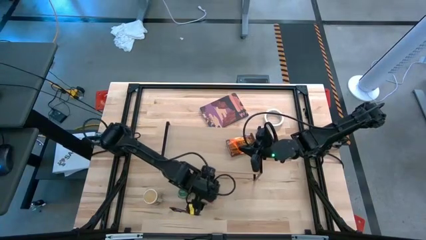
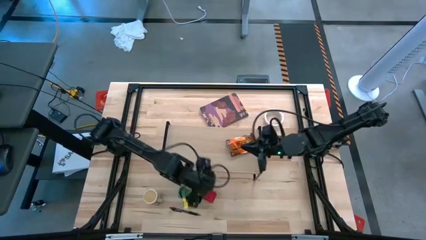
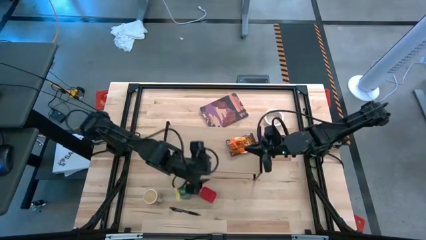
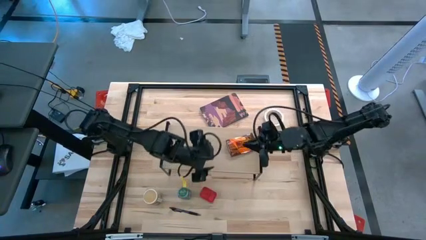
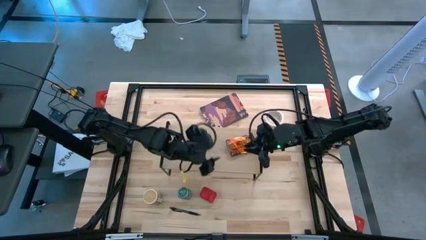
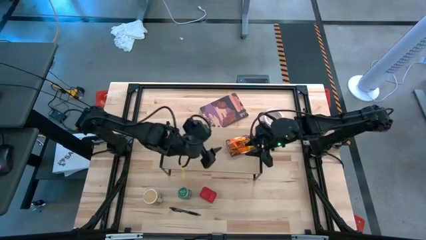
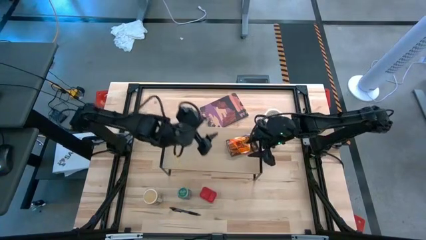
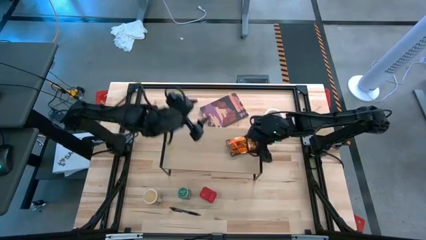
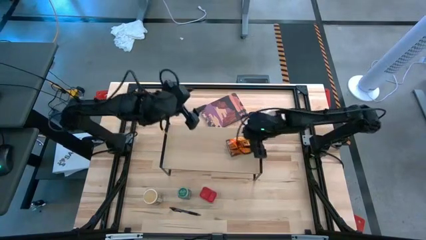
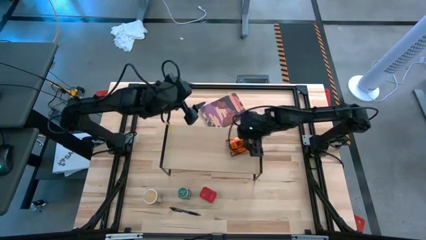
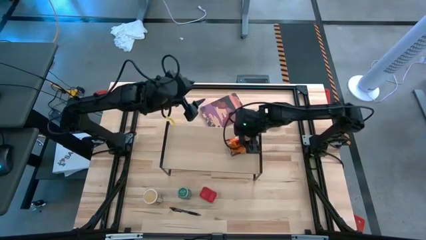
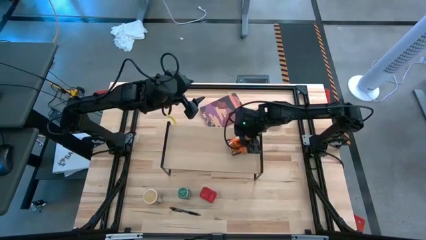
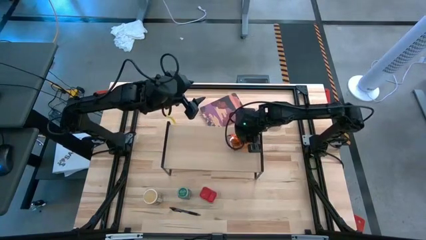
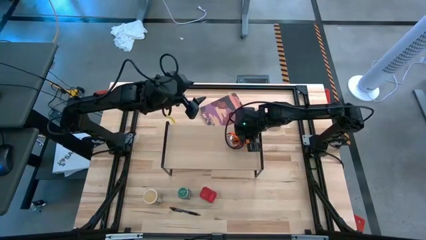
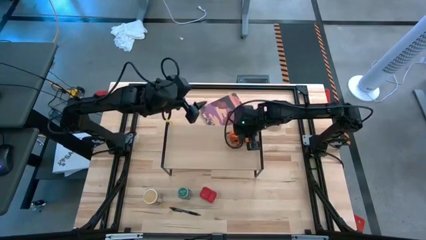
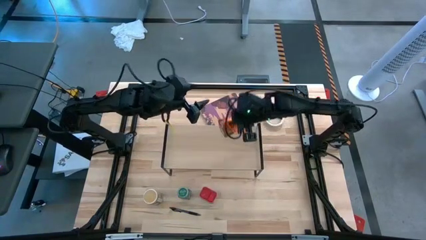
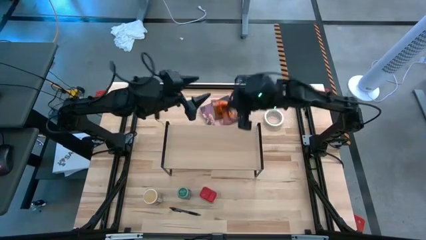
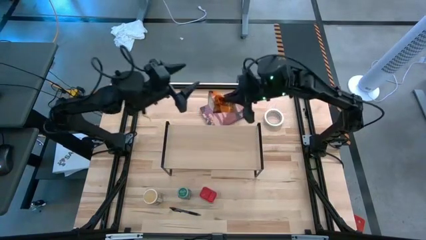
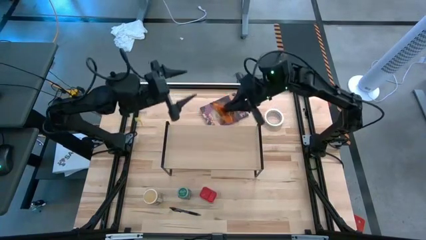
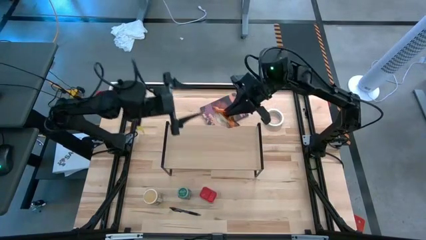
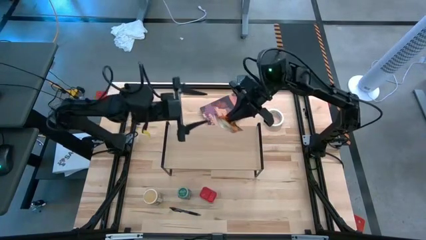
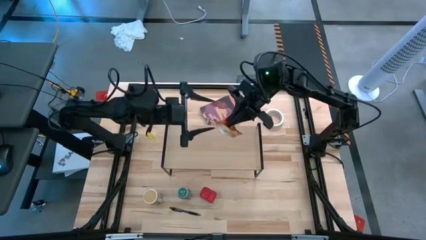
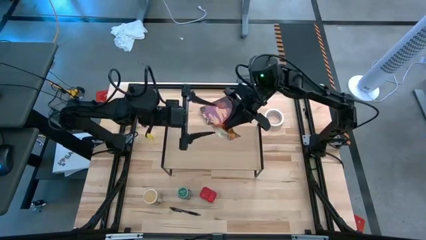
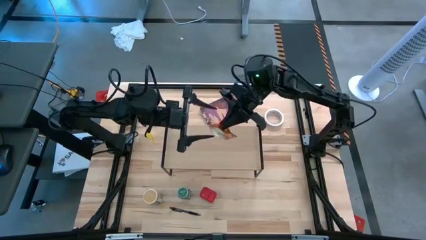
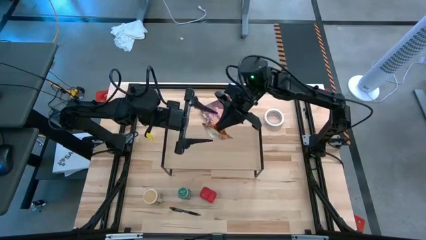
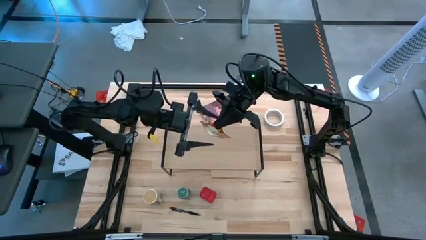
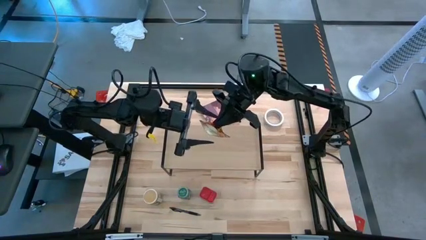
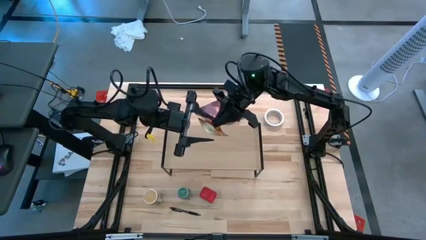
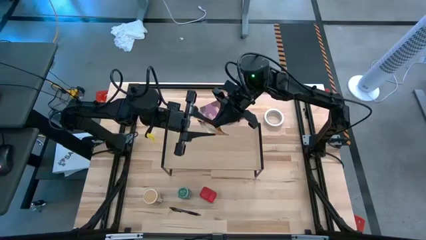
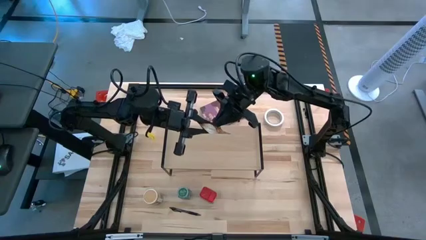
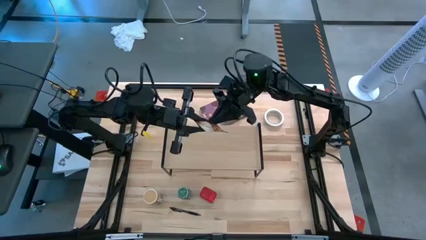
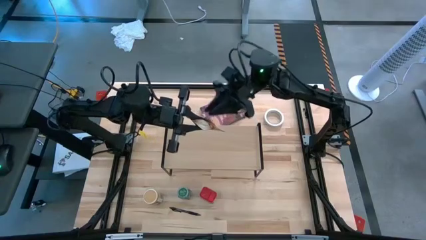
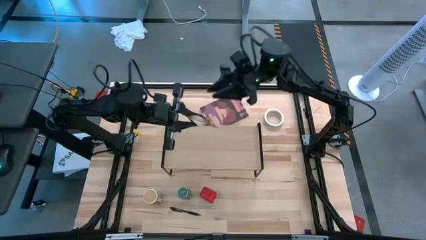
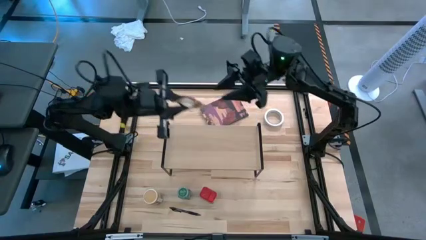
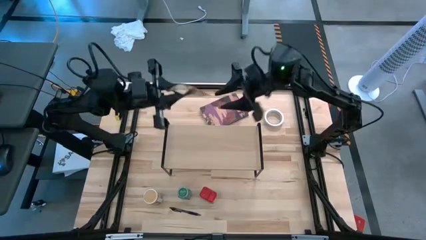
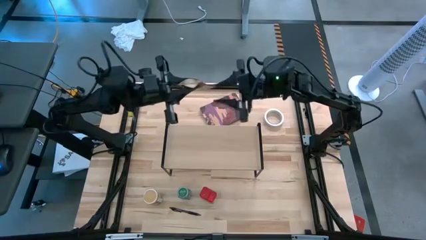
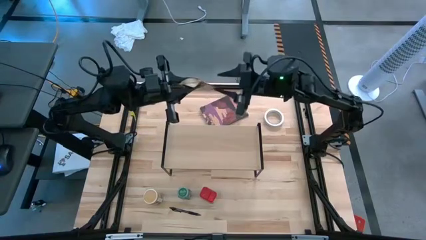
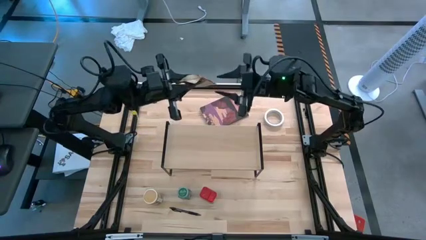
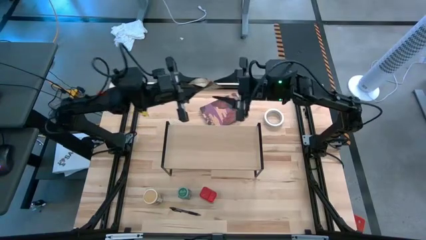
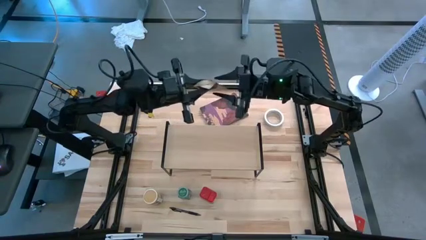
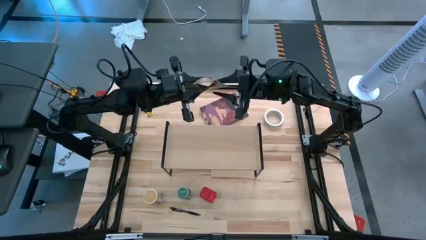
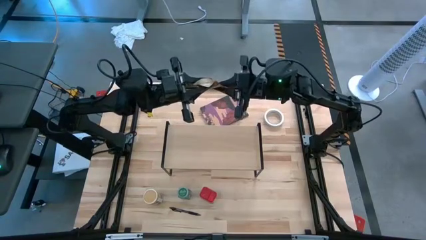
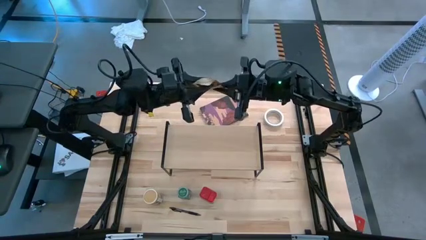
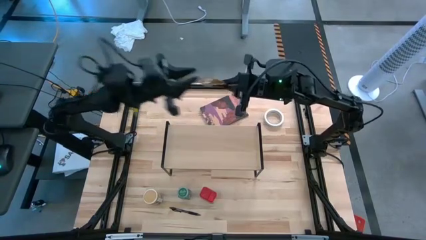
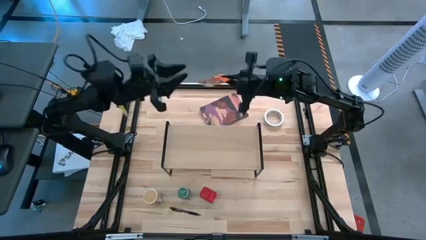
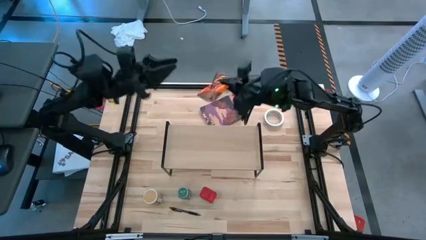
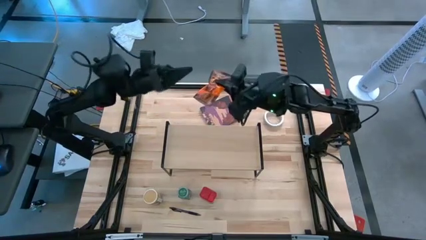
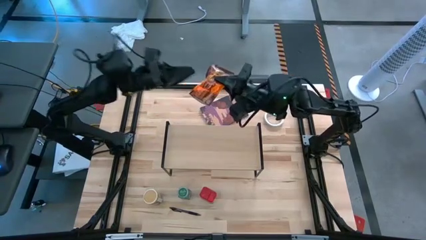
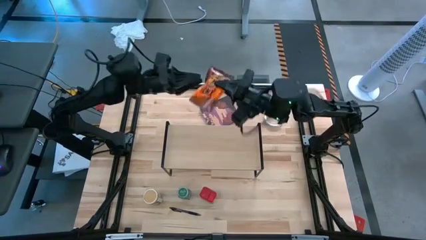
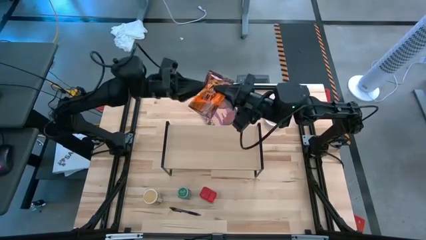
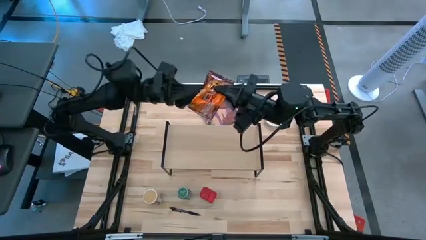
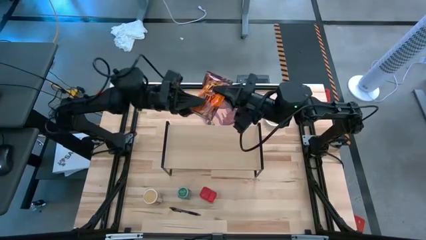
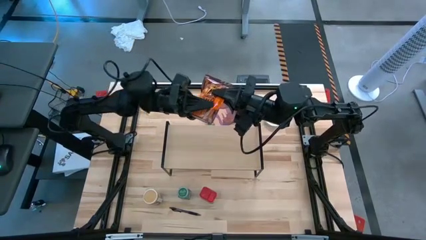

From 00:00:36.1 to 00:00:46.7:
Task: Shelf spices
Remove the orange seasoning pack from the shelf

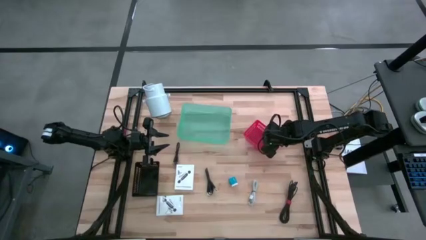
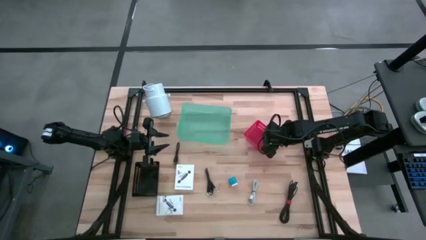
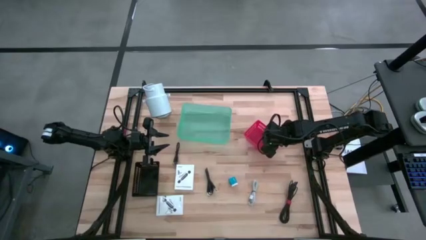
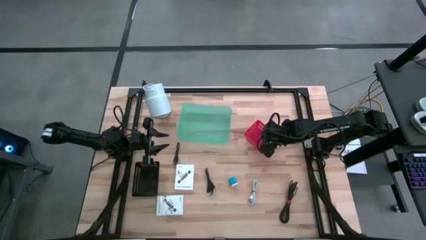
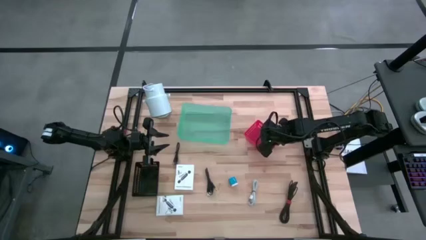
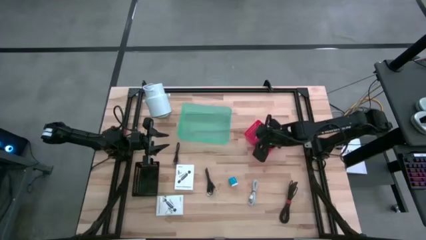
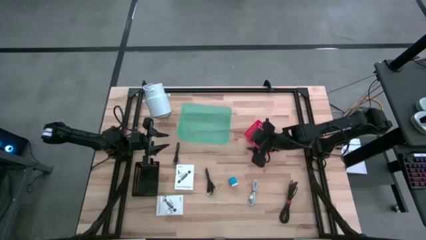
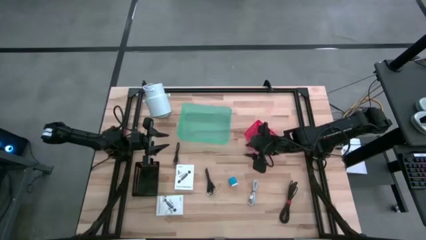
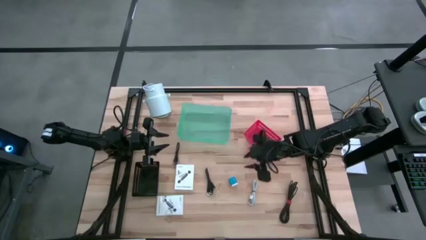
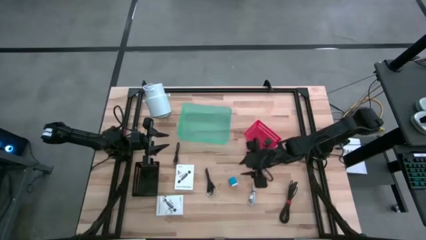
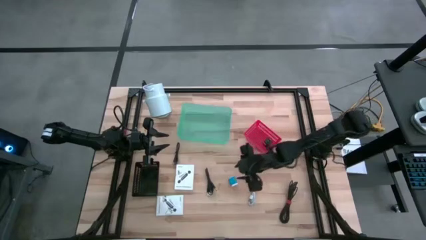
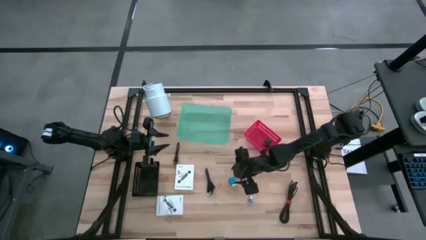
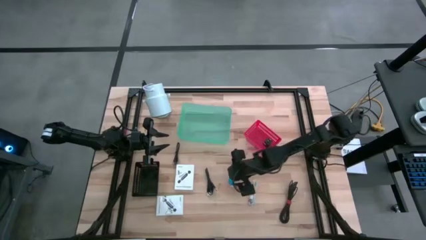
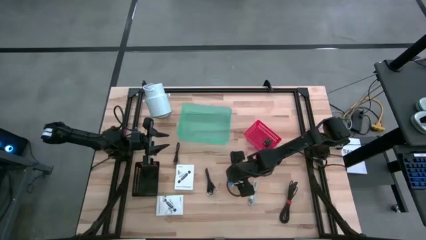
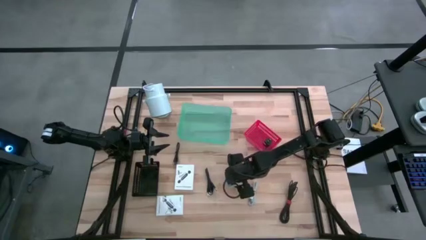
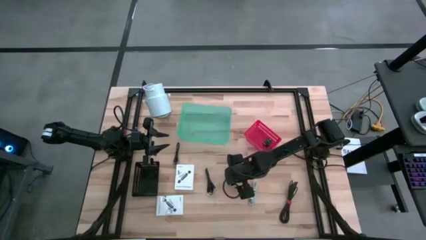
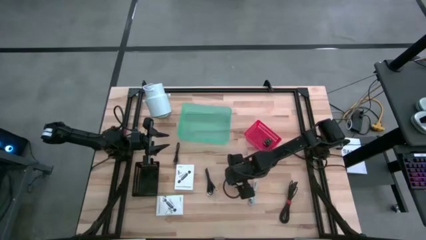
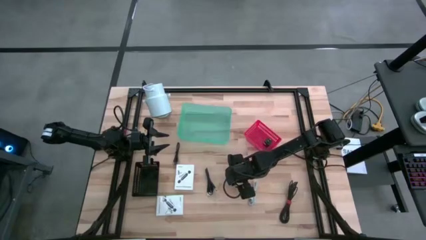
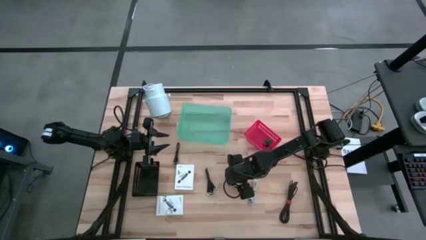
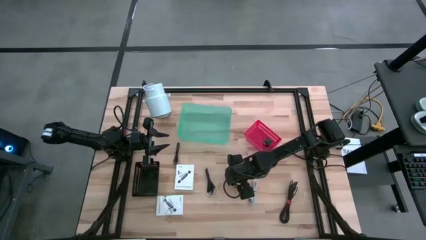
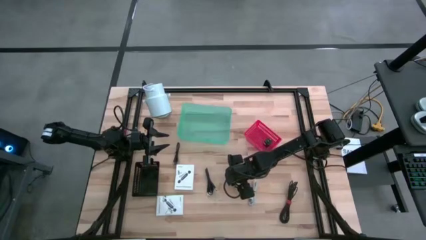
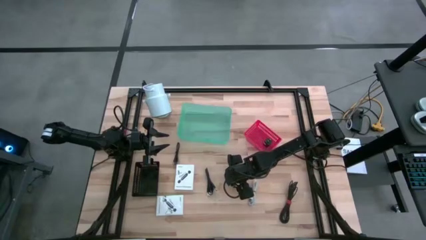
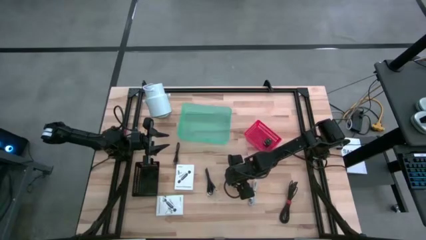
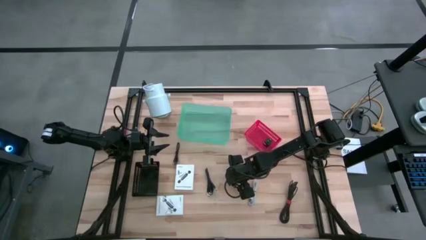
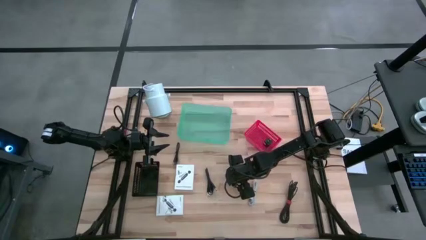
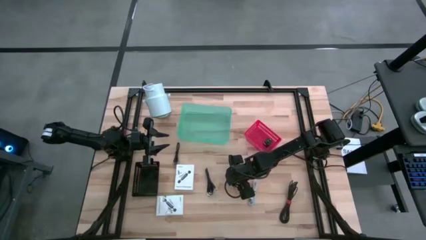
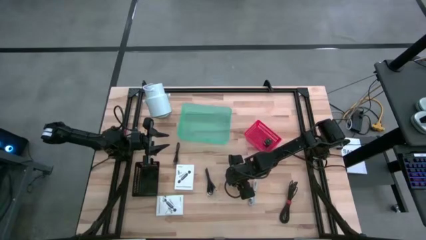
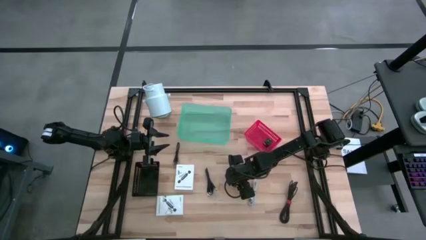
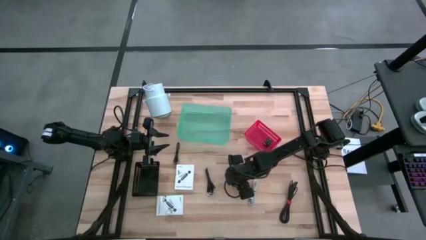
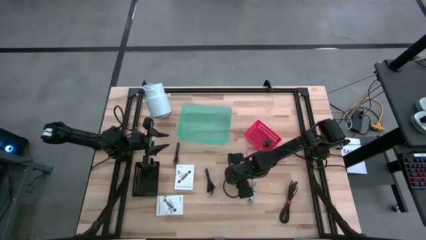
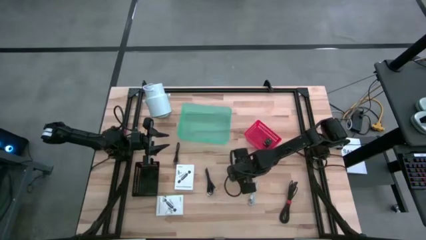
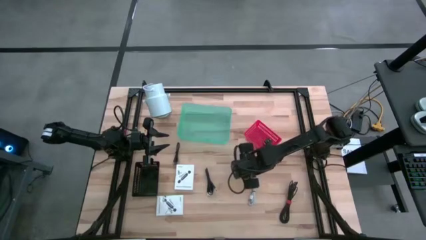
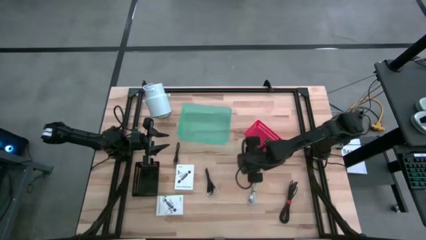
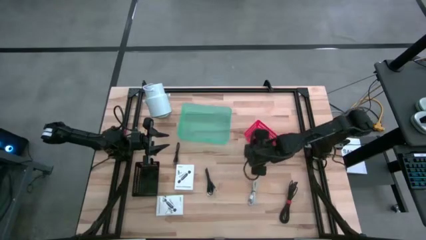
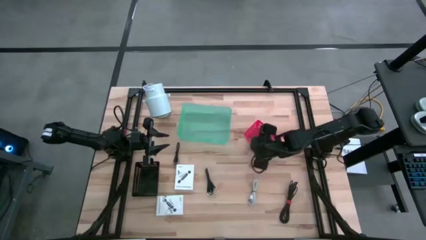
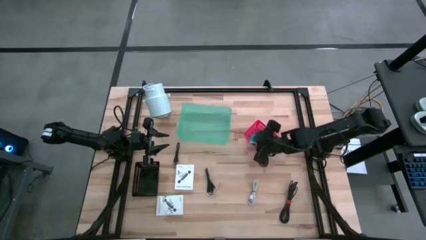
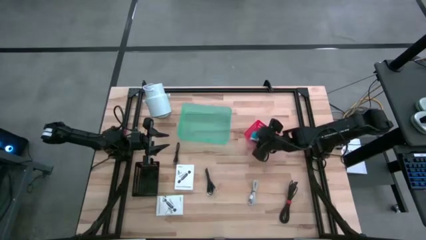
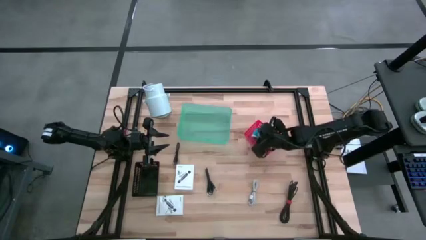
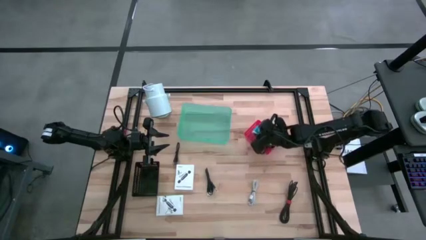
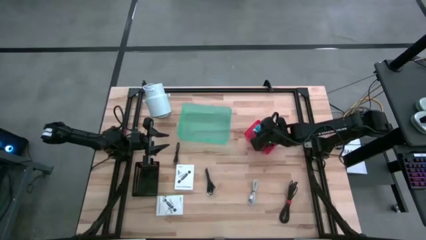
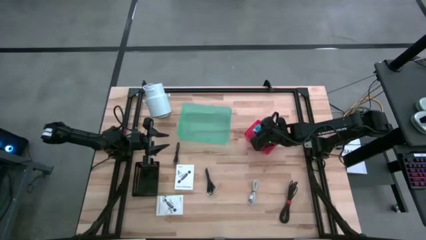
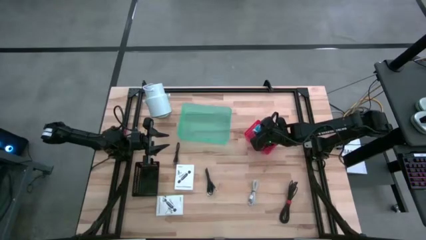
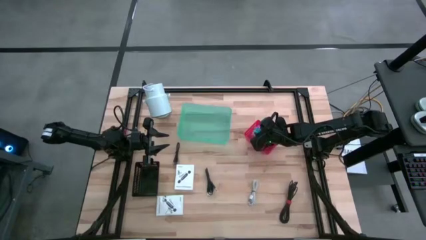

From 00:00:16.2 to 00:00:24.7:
Task: Pick and place items into bin
Put the blue charger adapter into the red bin
